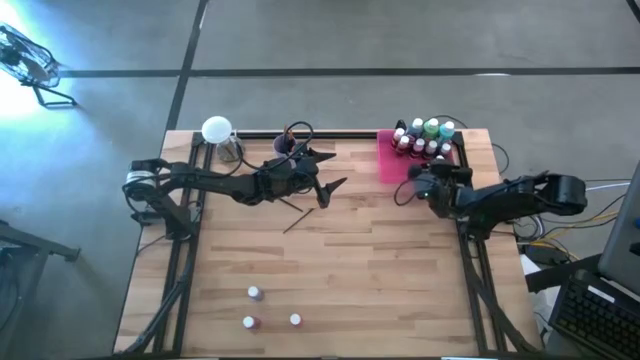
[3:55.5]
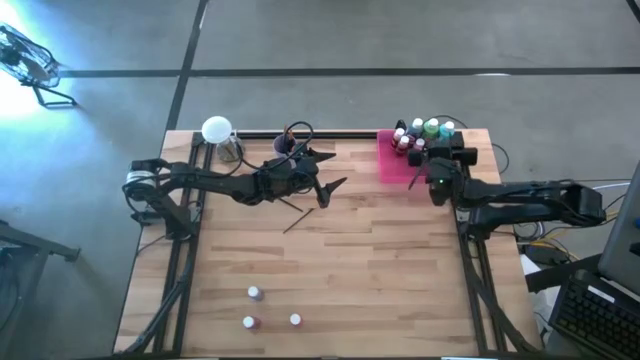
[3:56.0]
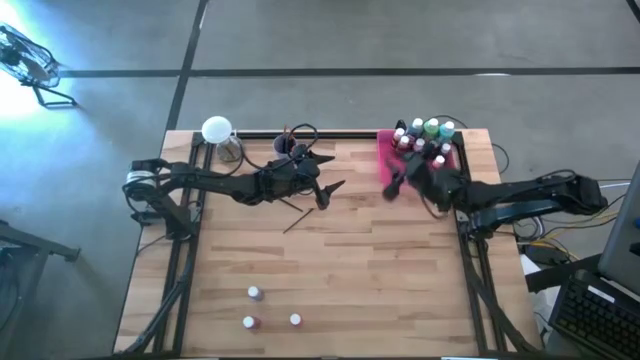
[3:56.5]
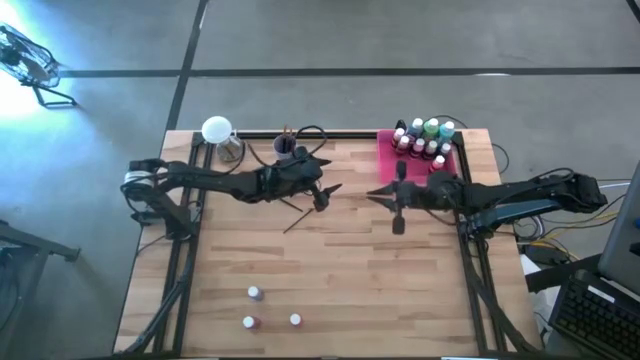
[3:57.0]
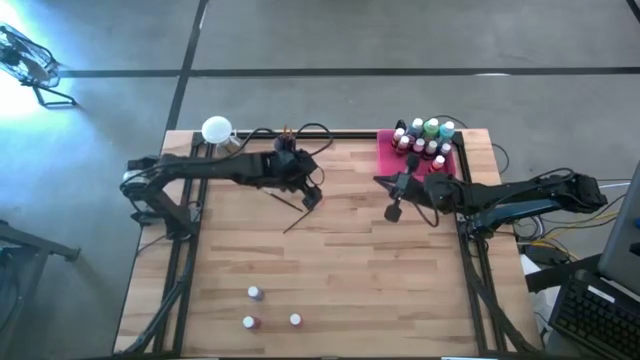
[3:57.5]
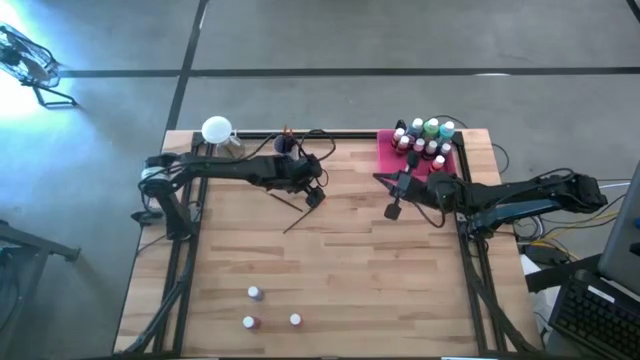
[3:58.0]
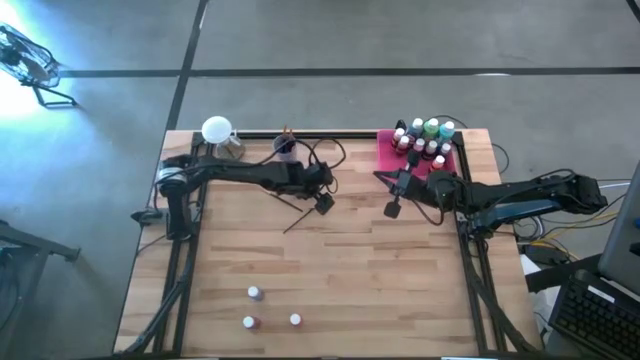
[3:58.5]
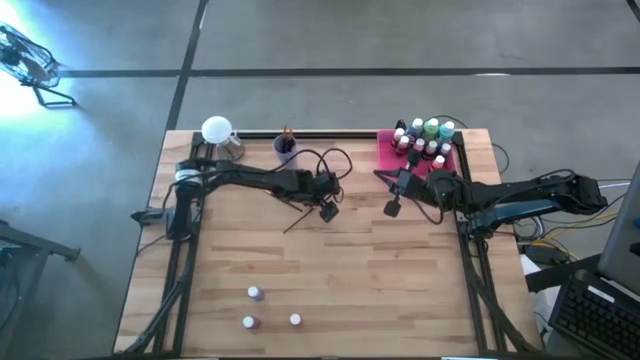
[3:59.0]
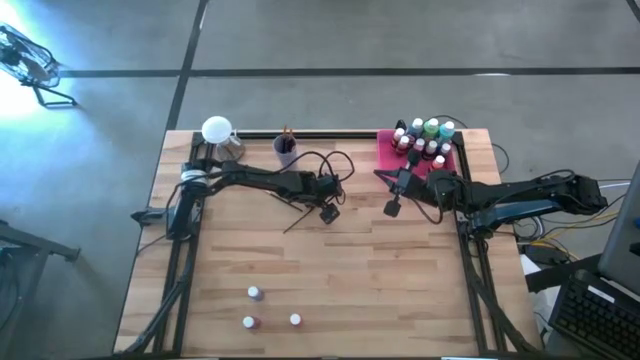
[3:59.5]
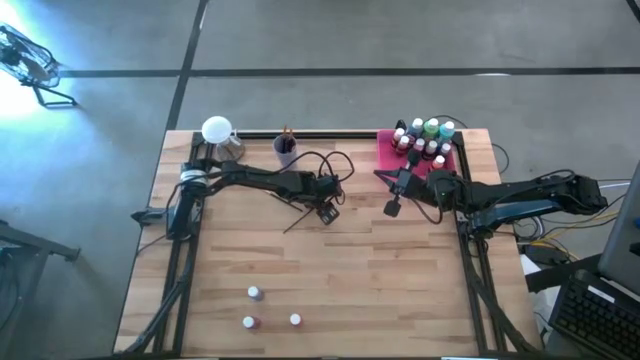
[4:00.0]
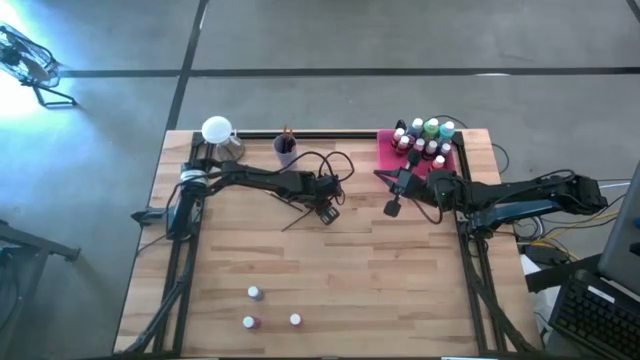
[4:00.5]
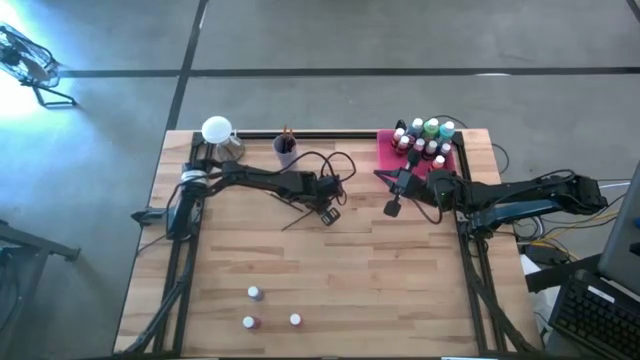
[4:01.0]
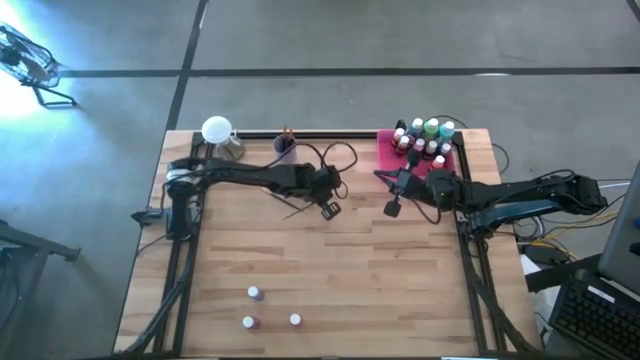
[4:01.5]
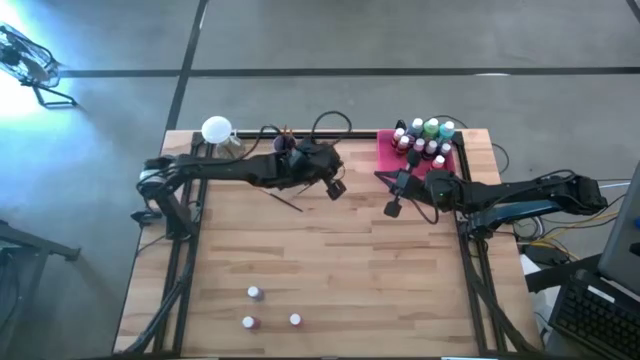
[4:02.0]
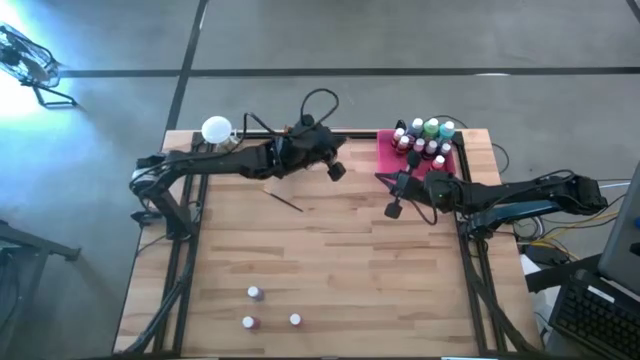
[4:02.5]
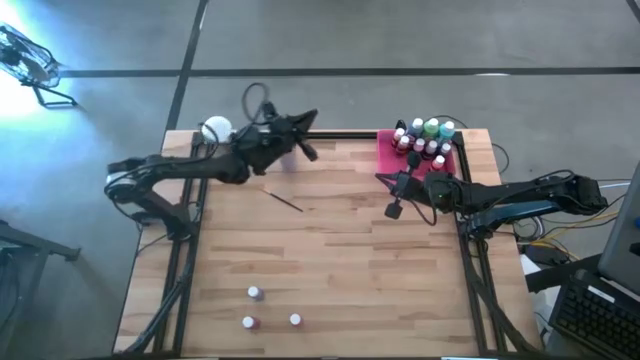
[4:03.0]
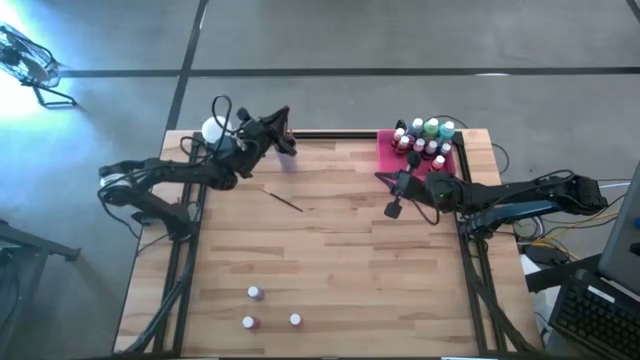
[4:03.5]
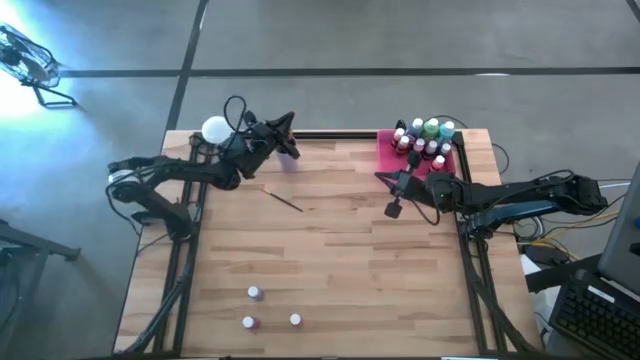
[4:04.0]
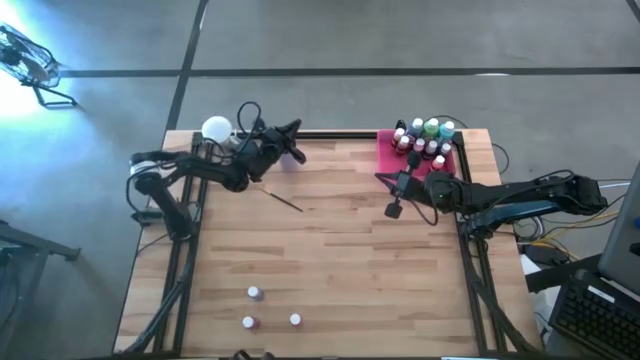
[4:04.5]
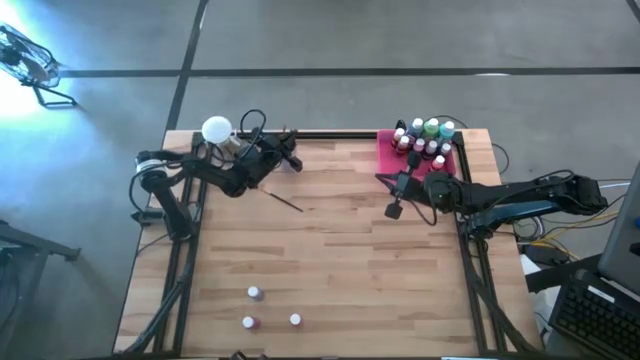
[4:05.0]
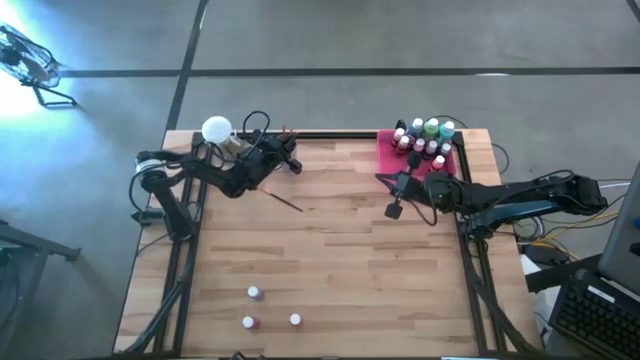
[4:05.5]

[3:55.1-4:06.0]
Task: Pick & Place Paint Supplies
Put the gold black paint brush into the purple cup

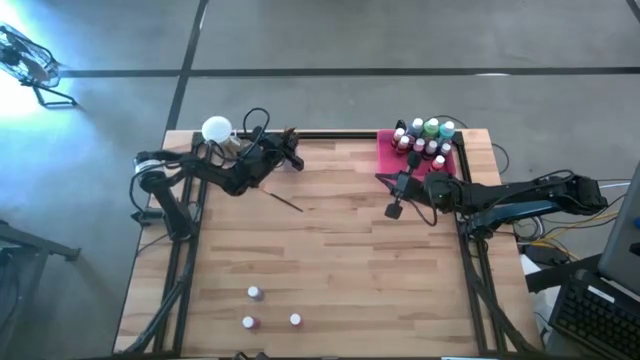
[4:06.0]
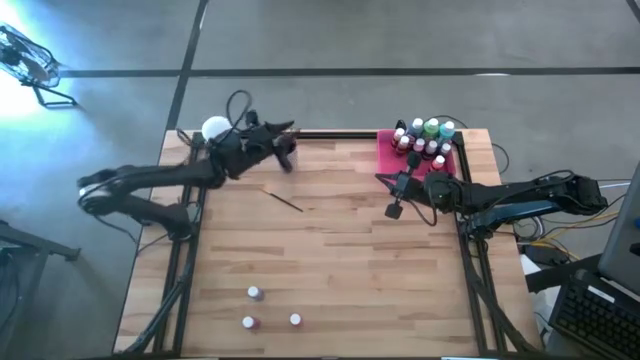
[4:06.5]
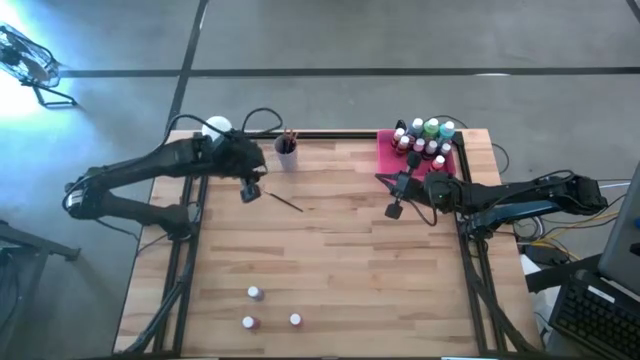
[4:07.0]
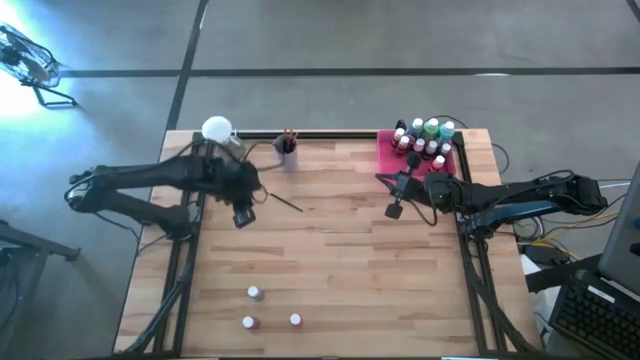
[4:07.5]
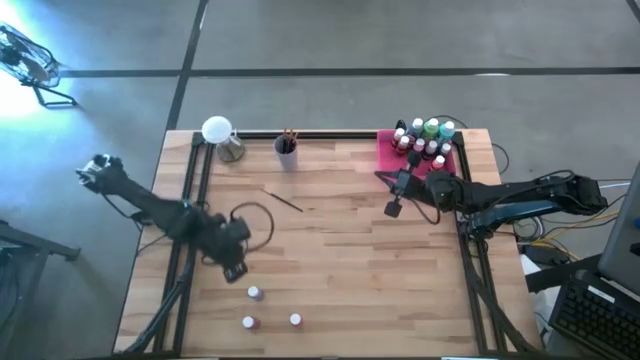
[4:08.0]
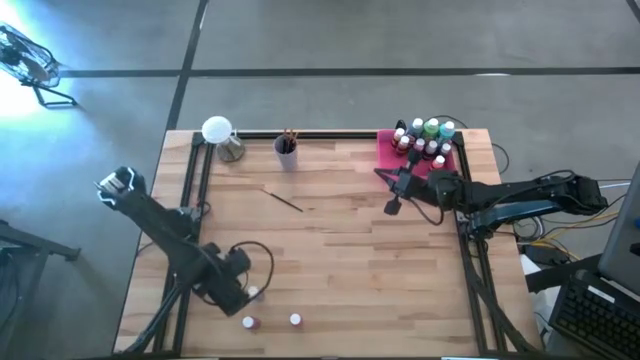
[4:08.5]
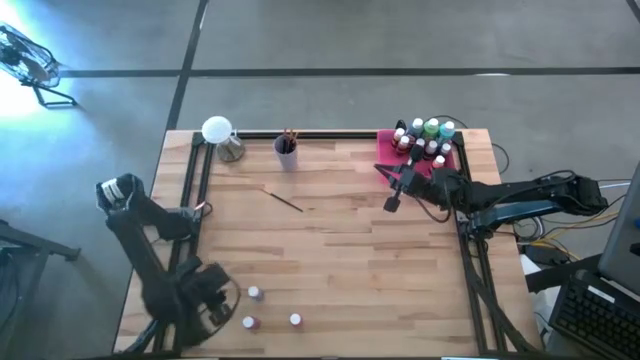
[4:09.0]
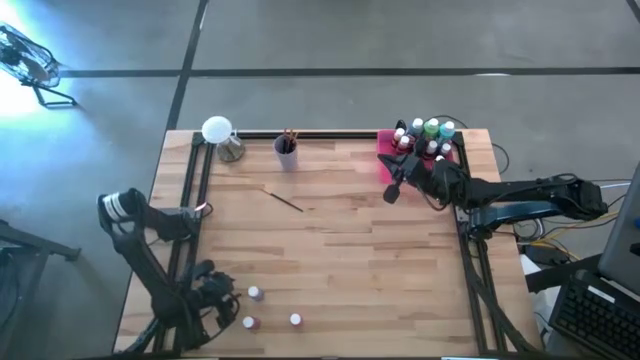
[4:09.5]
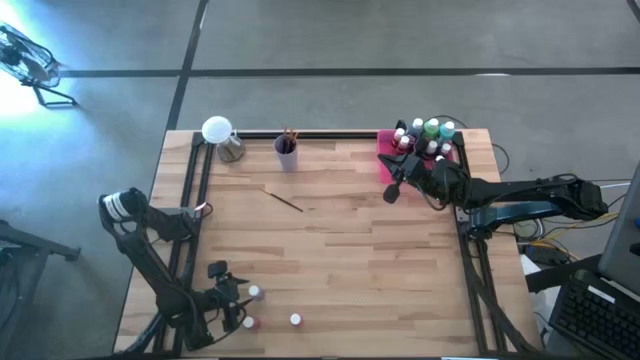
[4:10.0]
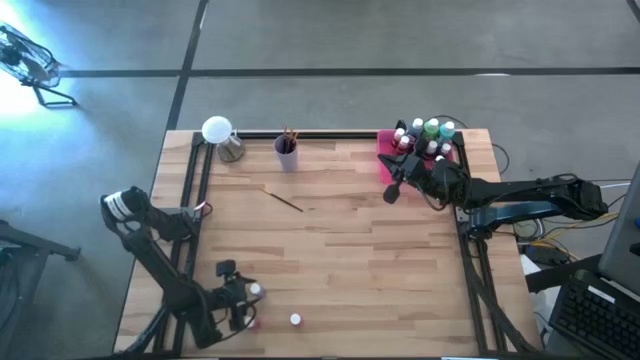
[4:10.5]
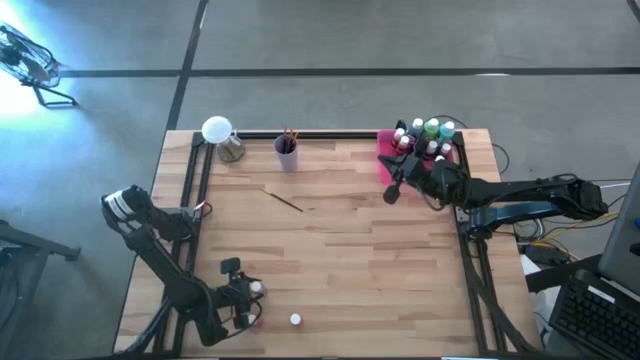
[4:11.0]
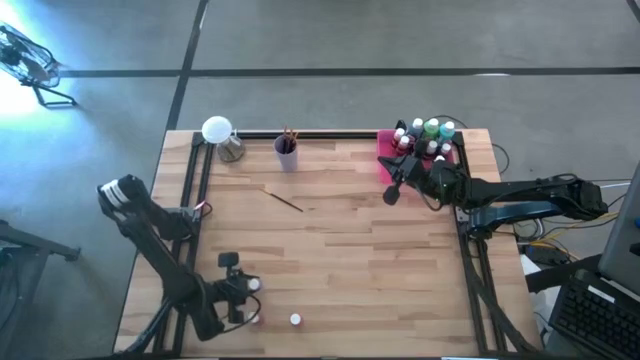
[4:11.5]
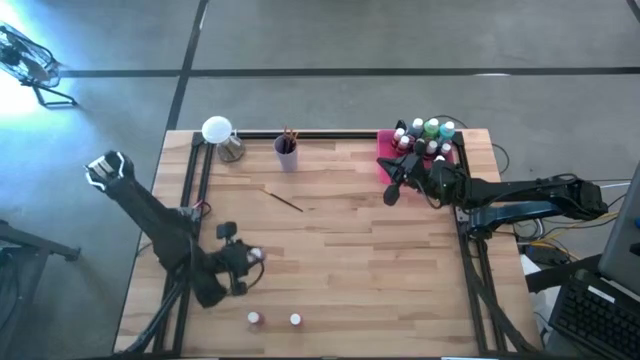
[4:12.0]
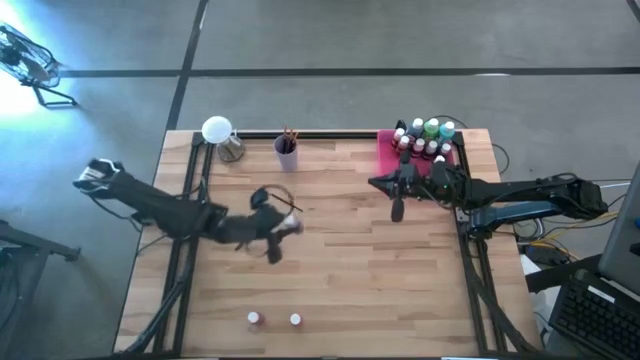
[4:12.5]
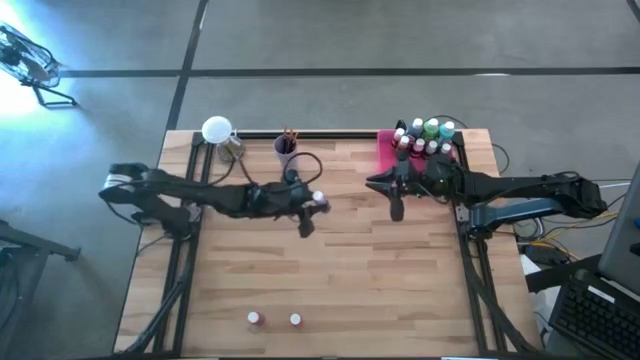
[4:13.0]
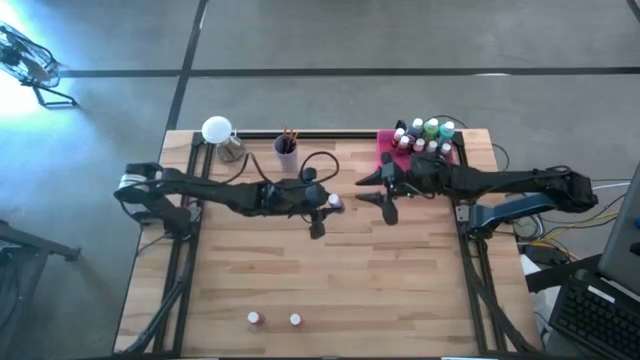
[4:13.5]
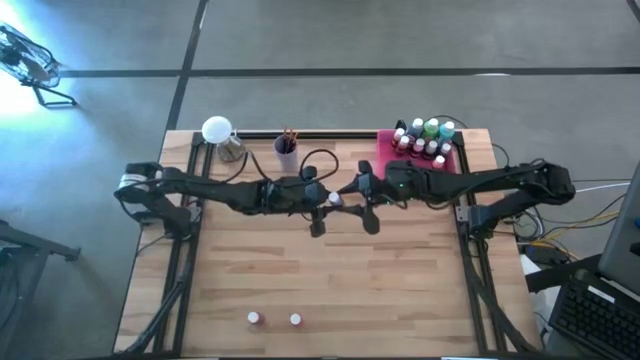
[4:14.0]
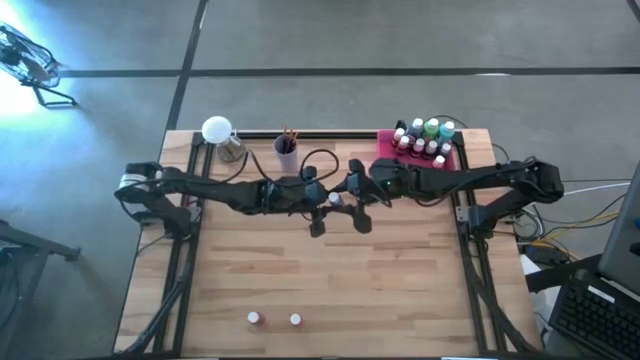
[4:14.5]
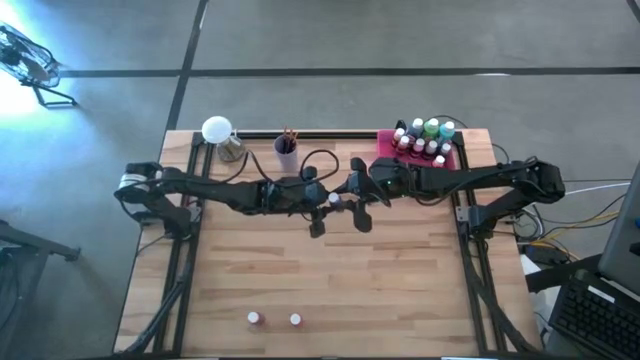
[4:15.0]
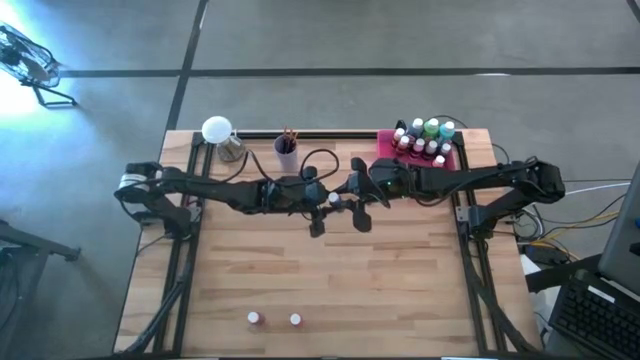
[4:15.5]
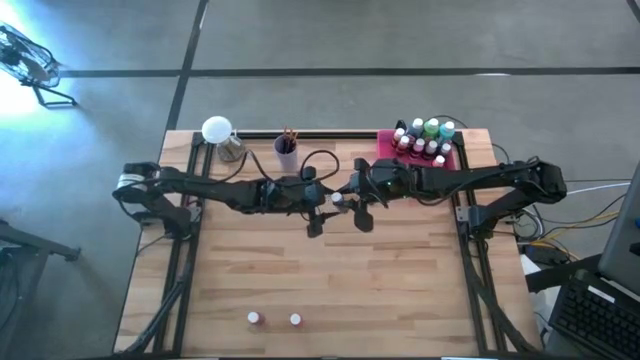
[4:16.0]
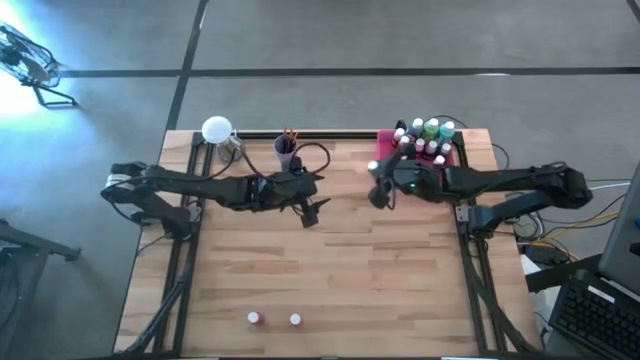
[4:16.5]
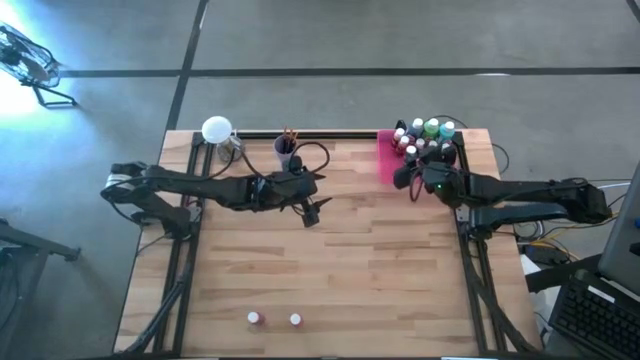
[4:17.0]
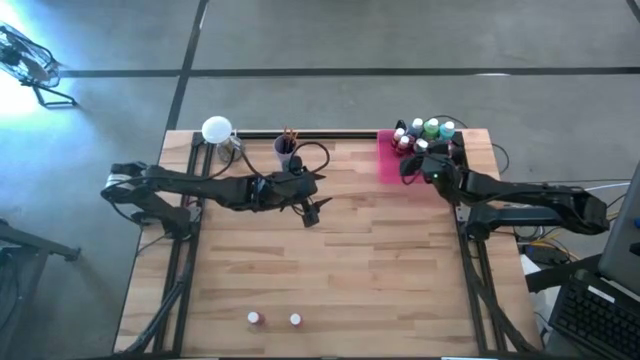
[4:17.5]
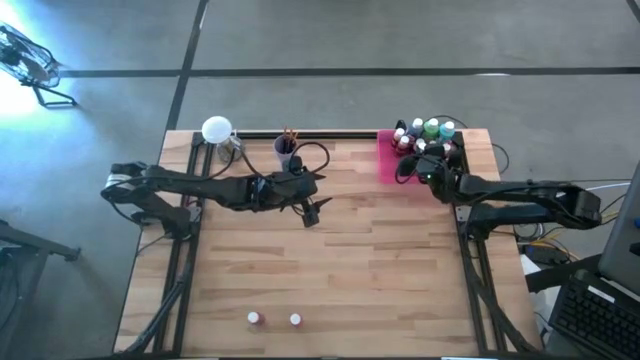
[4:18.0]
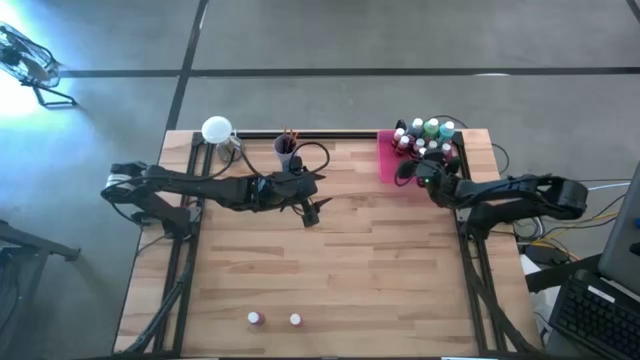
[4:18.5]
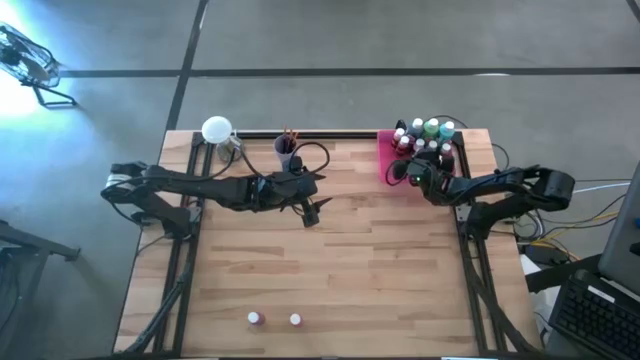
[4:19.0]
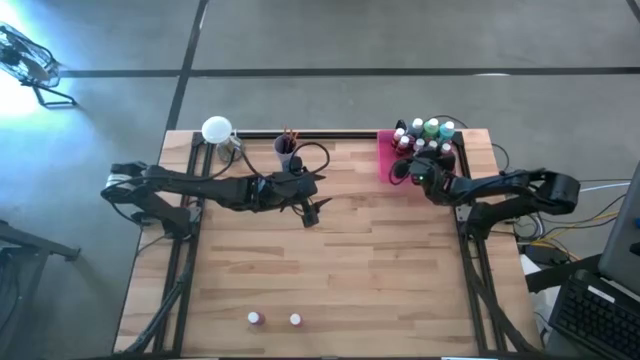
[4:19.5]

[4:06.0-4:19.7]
Put the small purple paint bottle into the pink bin
